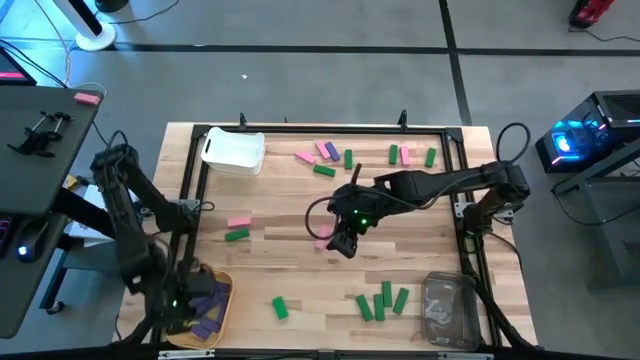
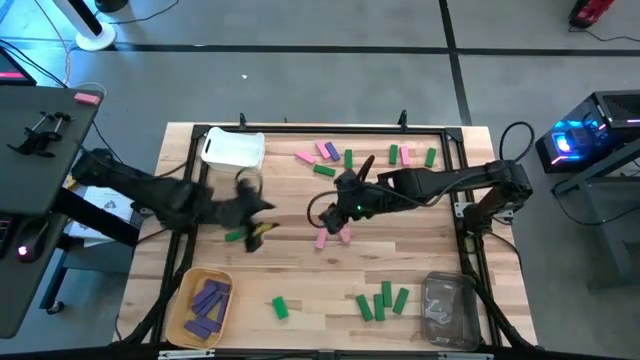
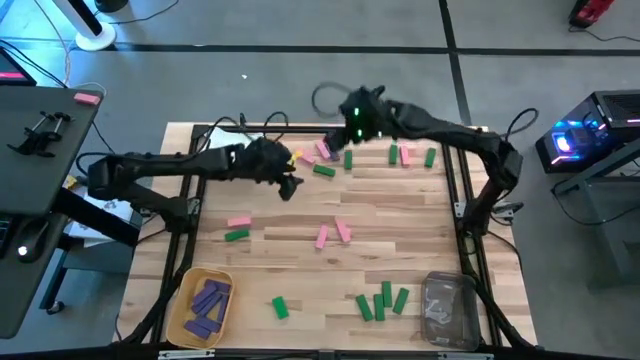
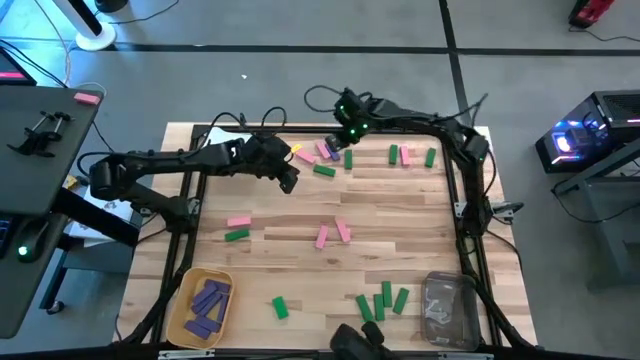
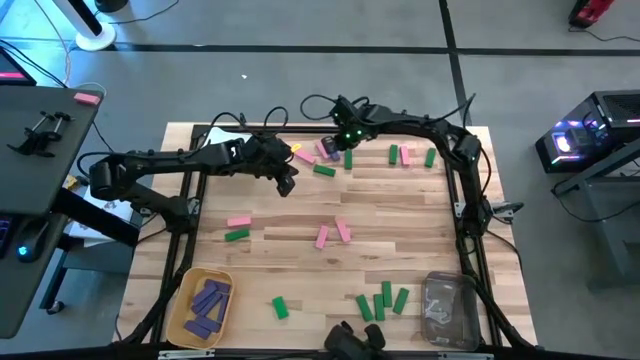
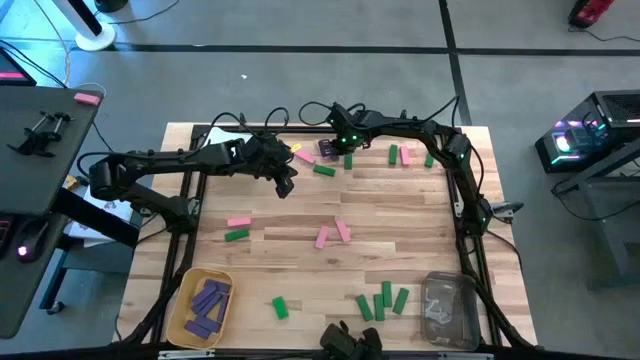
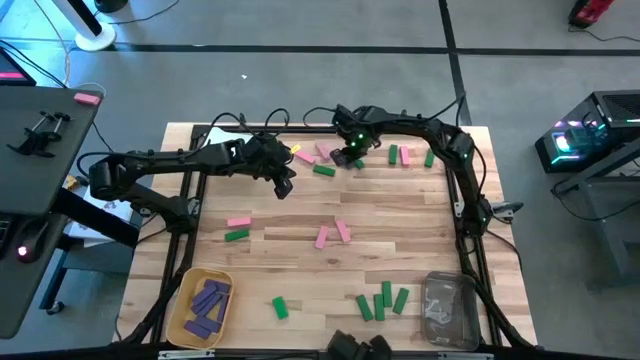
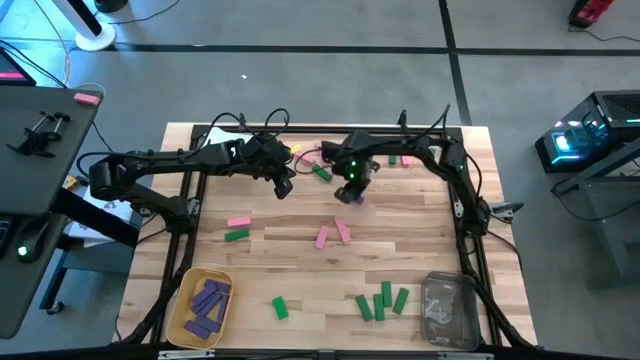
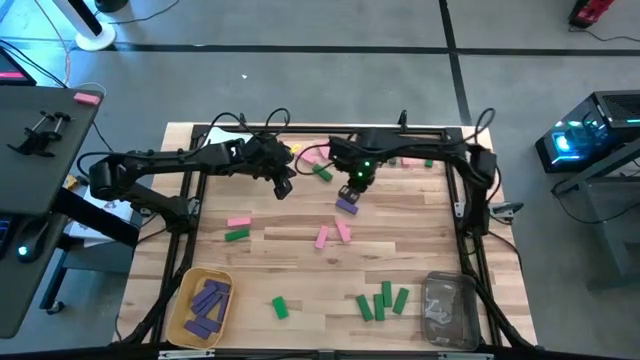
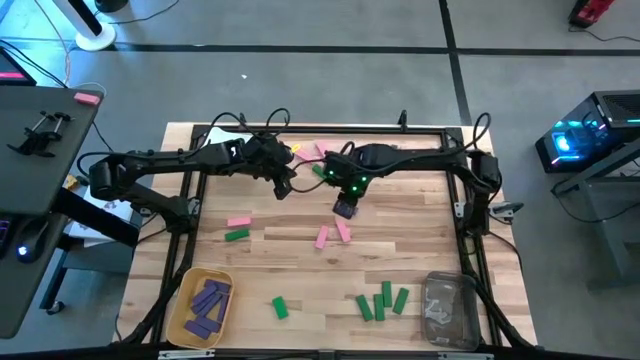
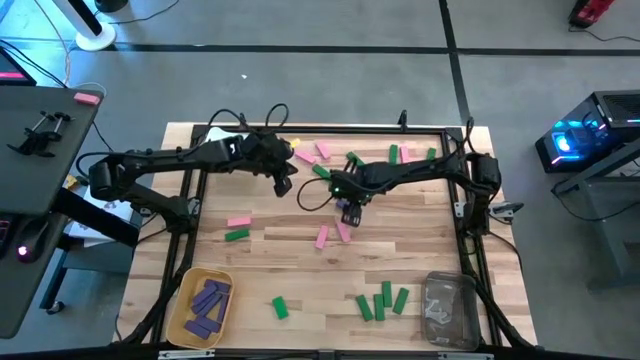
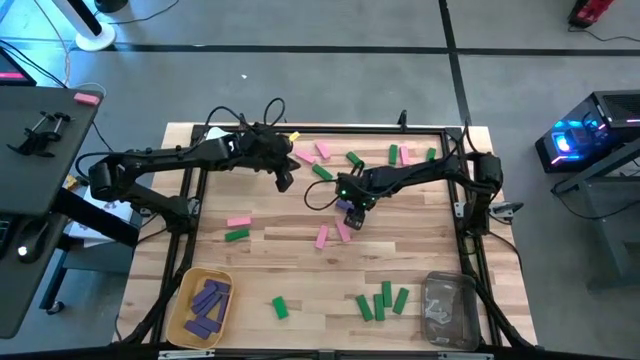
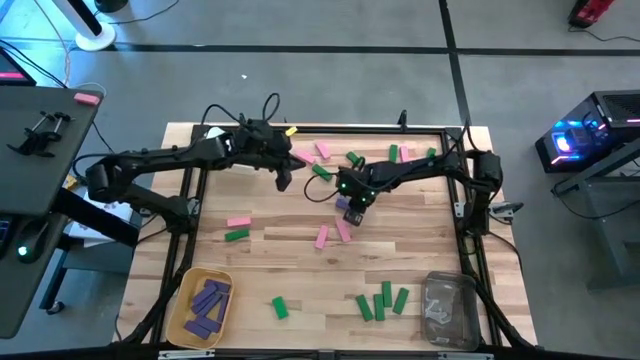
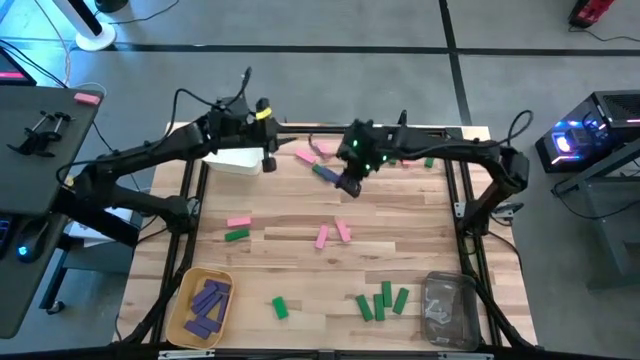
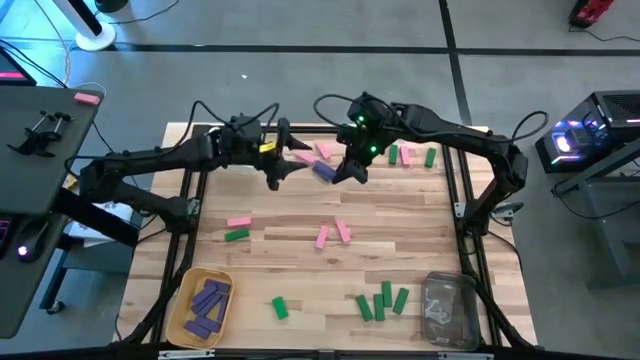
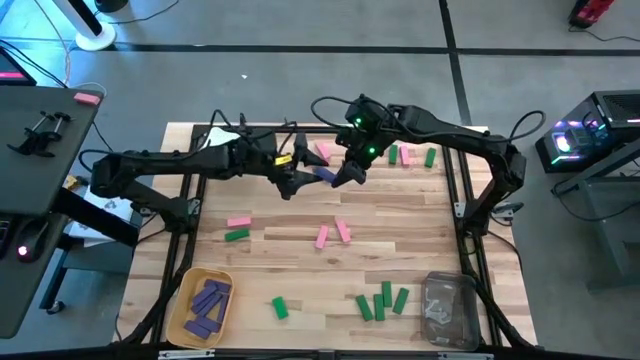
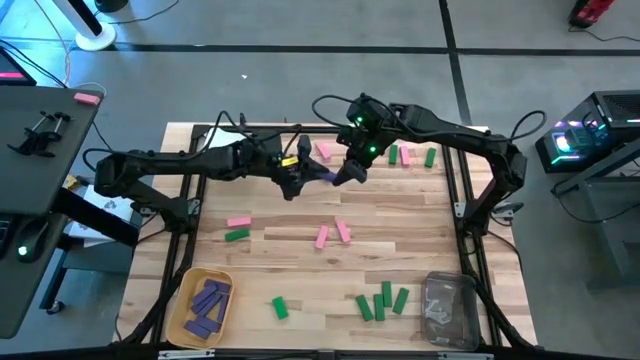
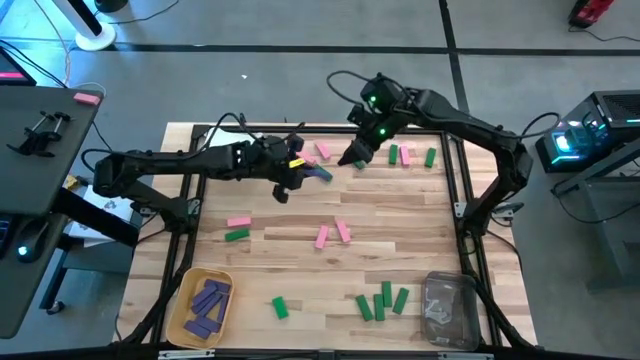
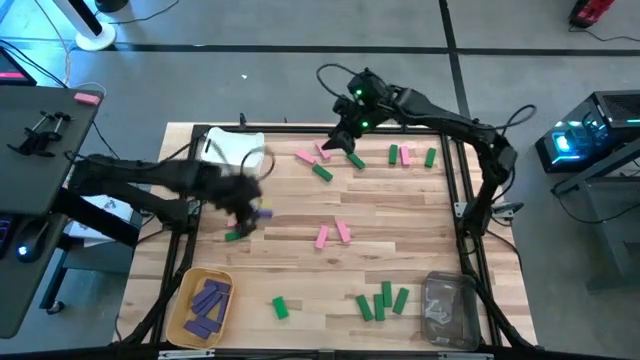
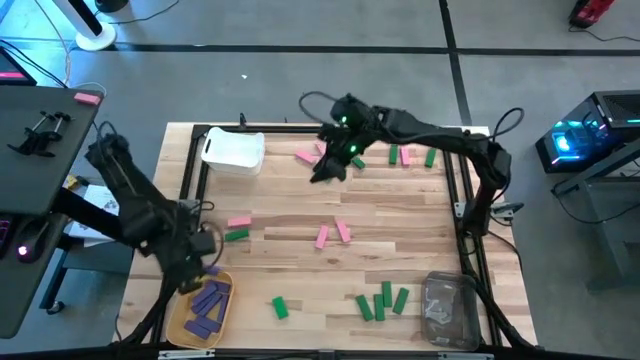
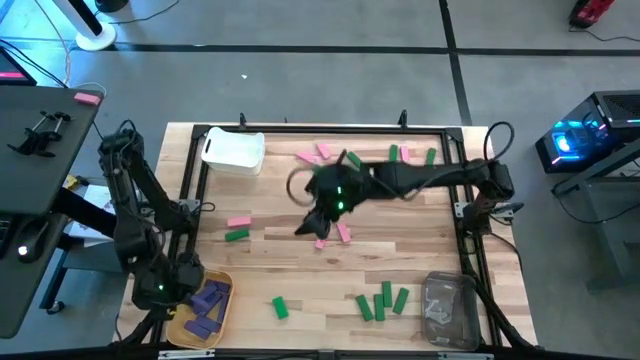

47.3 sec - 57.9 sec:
Task: Sort blocks
Put the violet block into the yellow bin

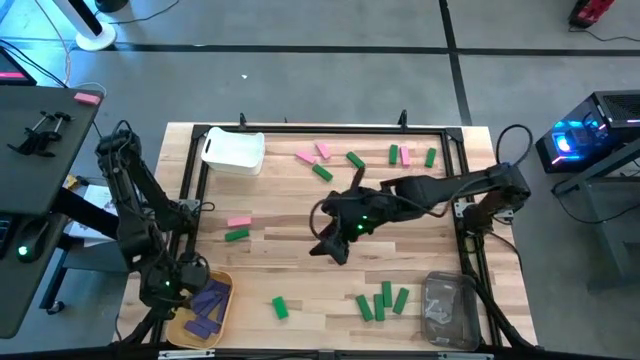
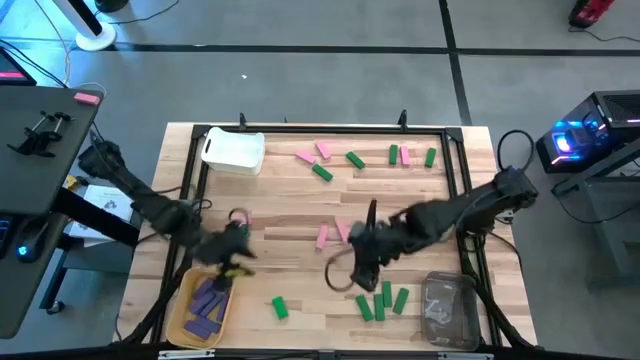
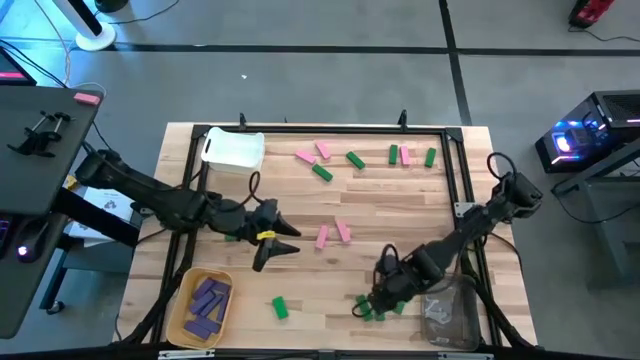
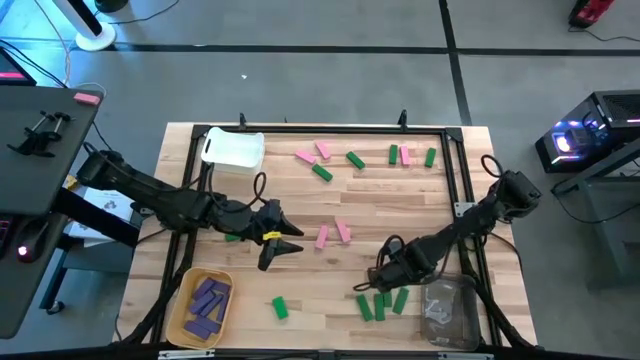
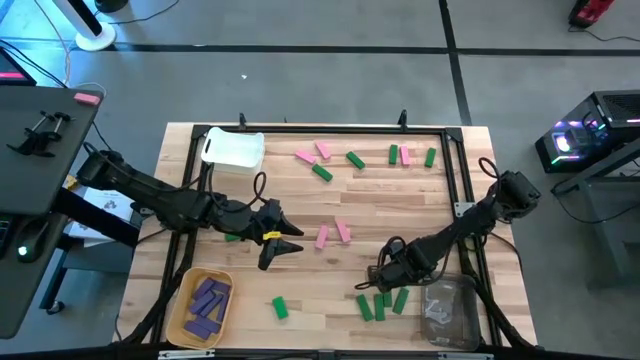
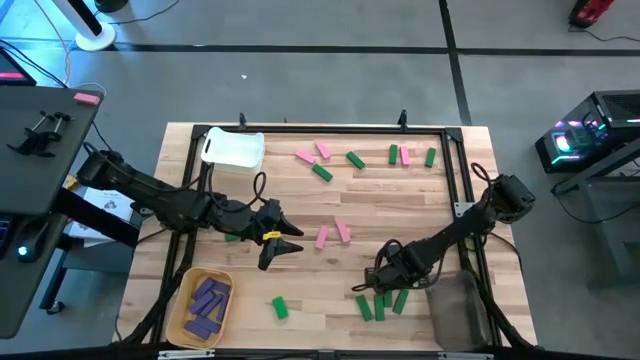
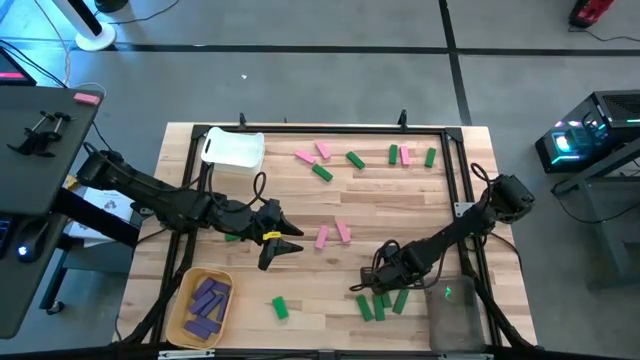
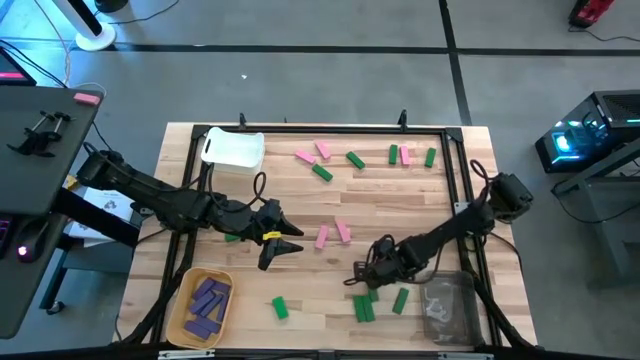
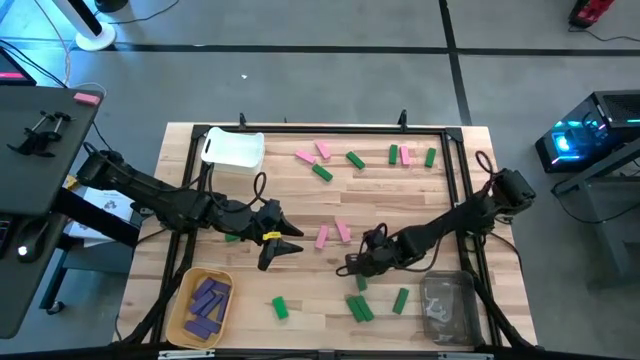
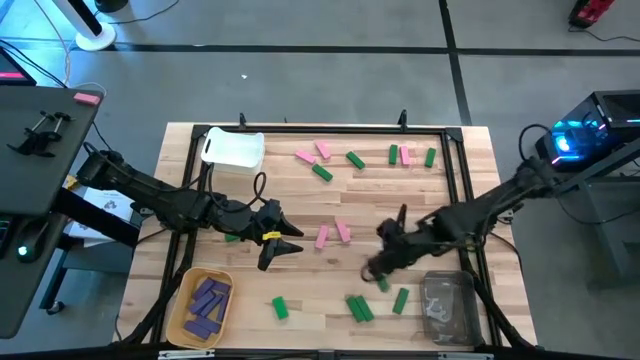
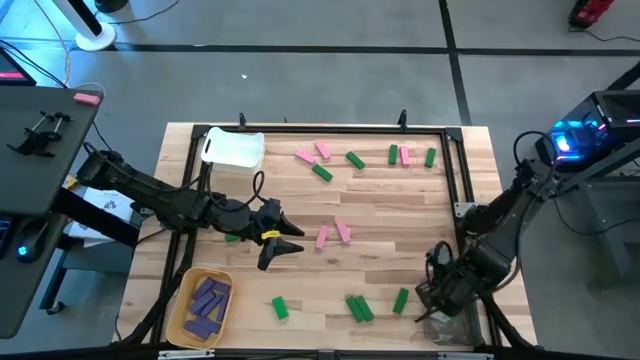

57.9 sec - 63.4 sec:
Put the green block into the black bin

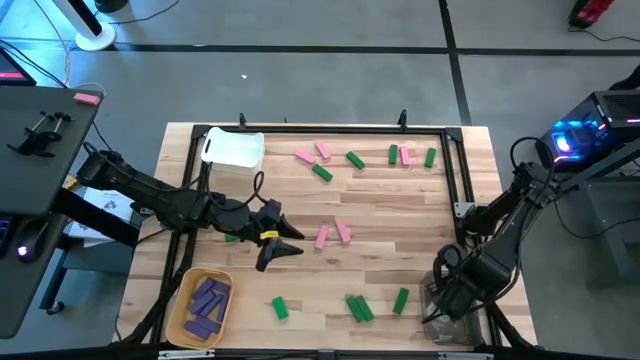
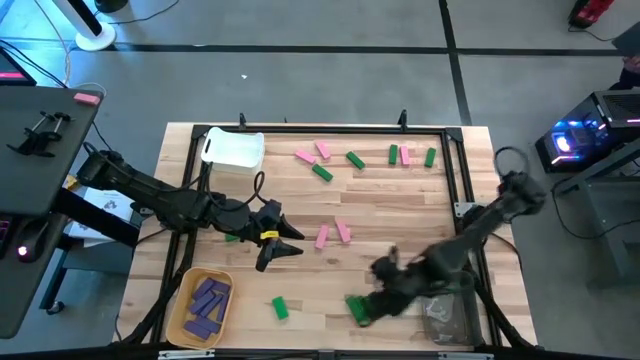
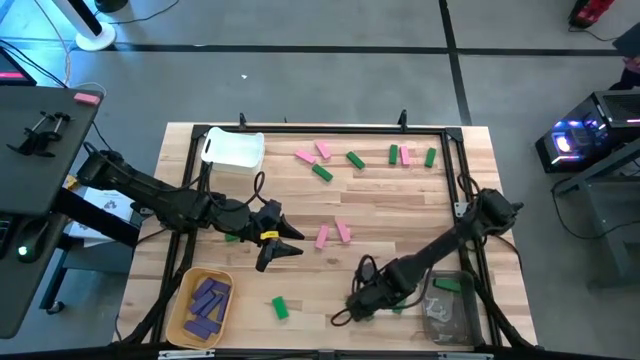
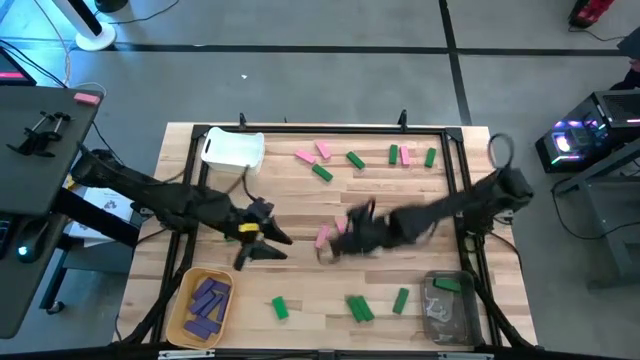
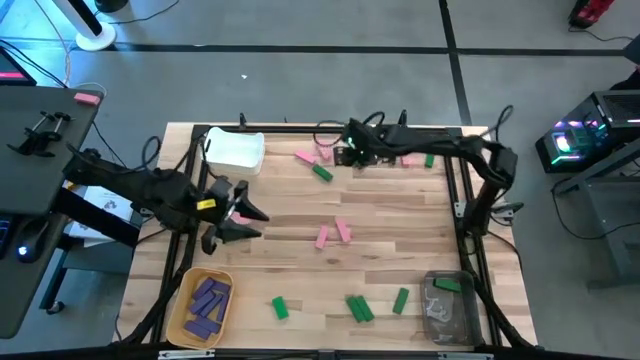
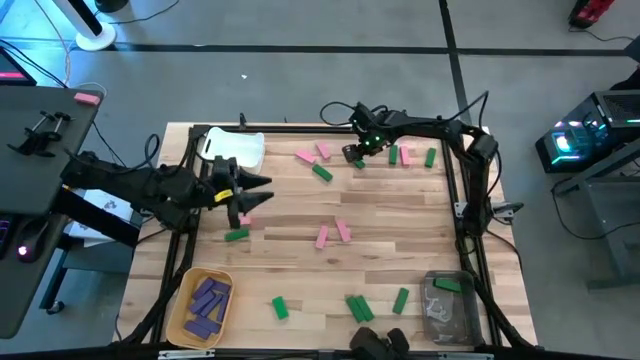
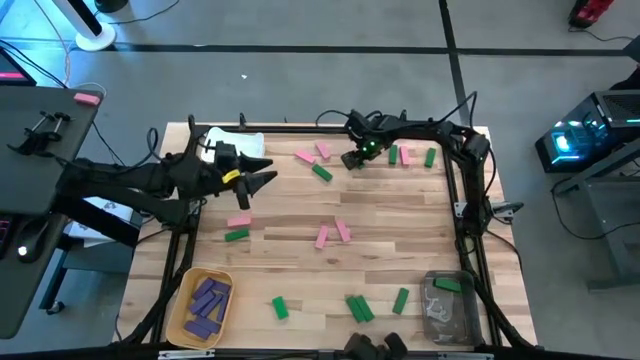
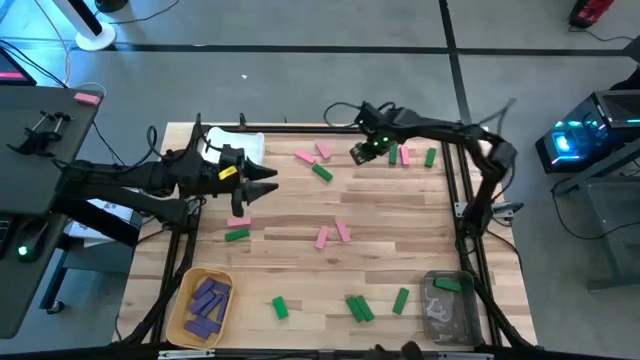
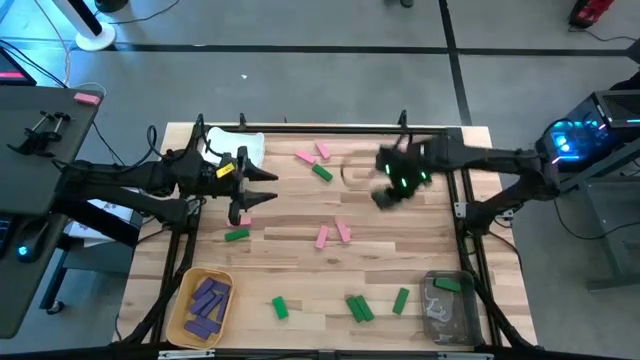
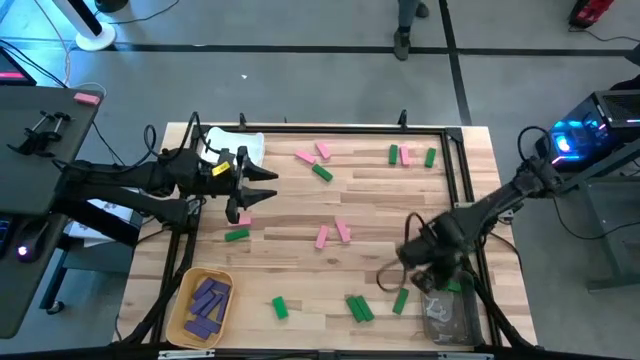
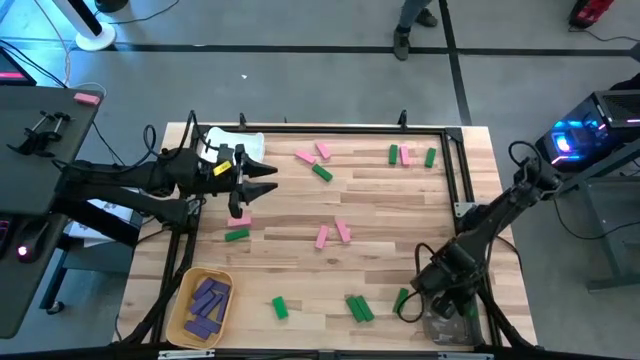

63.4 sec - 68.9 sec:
Put the green block into the black bin
